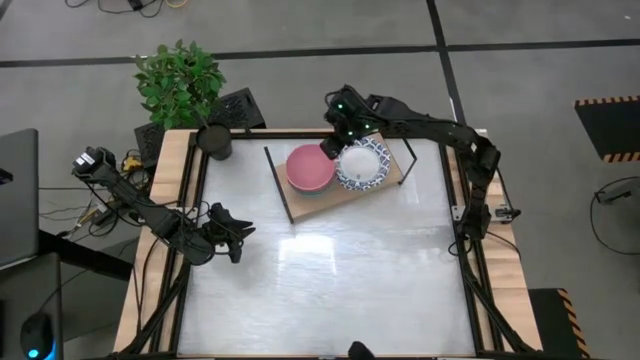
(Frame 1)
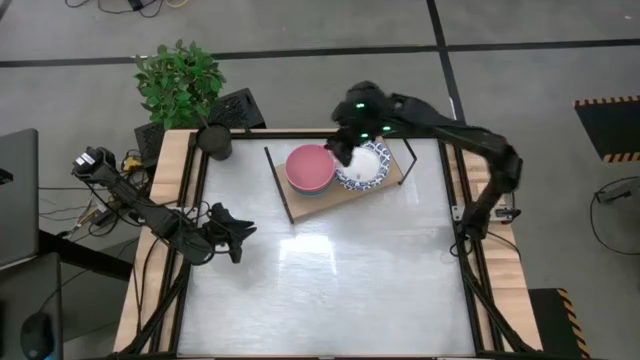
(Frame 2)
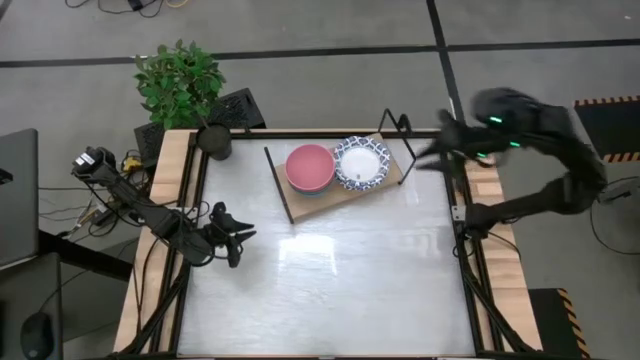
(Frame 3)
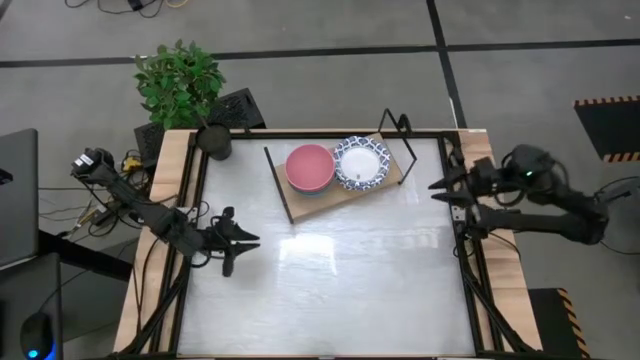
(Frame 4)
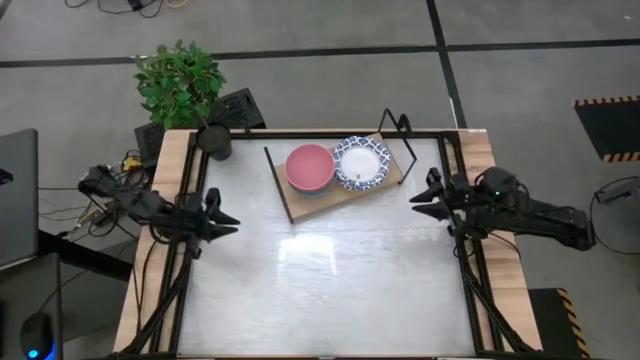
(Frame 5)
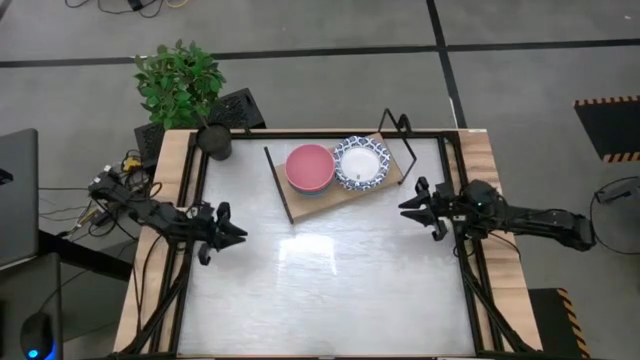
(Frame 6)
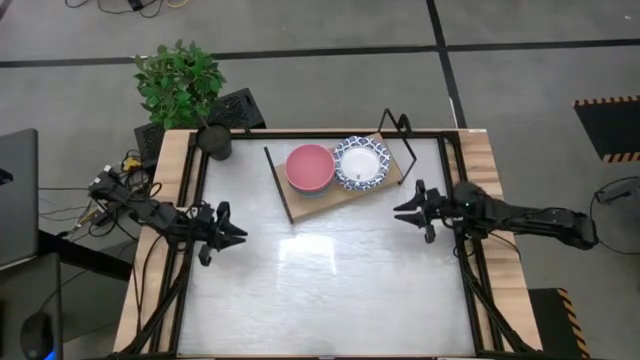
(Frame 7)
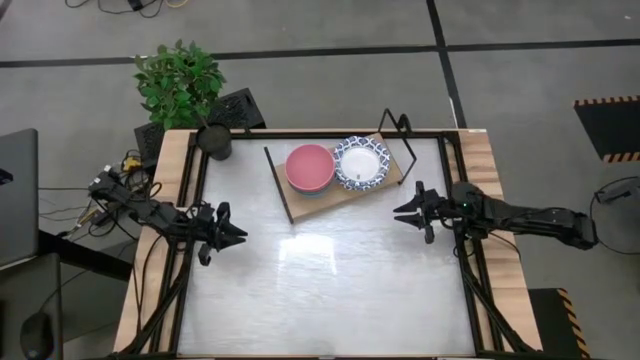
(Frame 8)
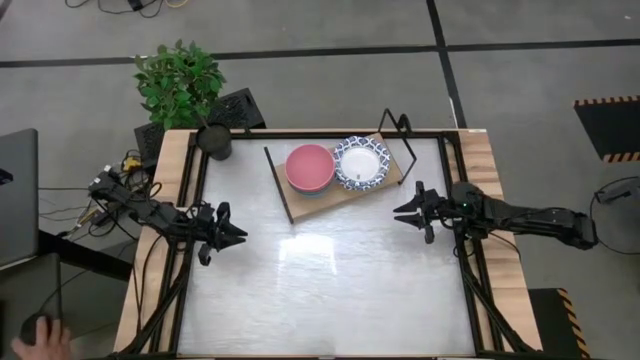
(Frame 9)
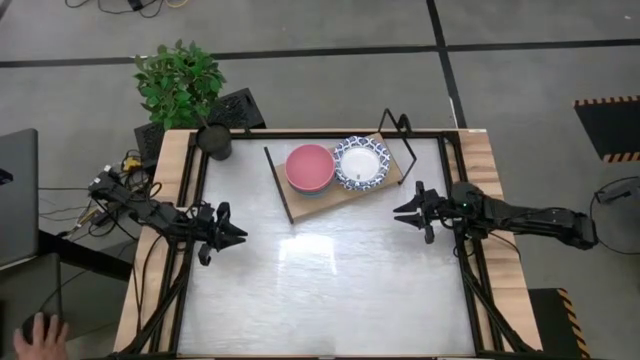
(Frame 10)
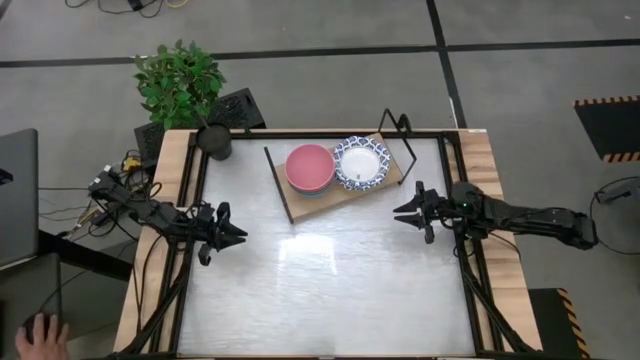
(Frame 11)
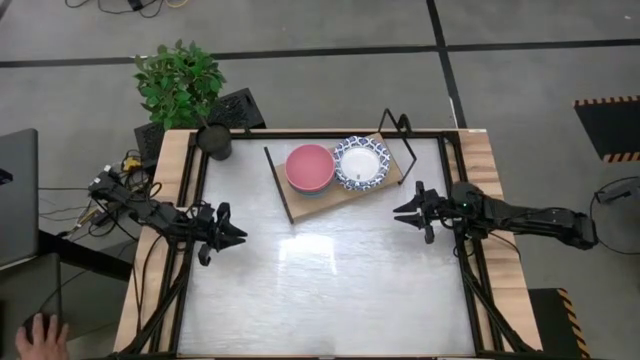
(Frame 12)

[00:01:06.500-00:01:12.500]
Task: Place and stack bowls onto a shelf
Return to Home Position

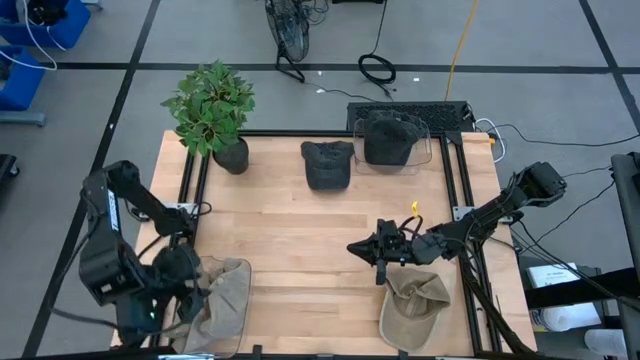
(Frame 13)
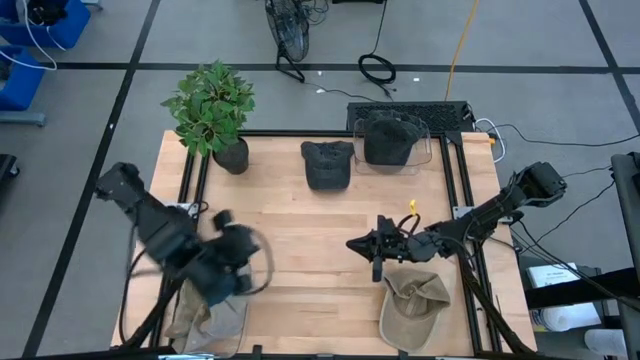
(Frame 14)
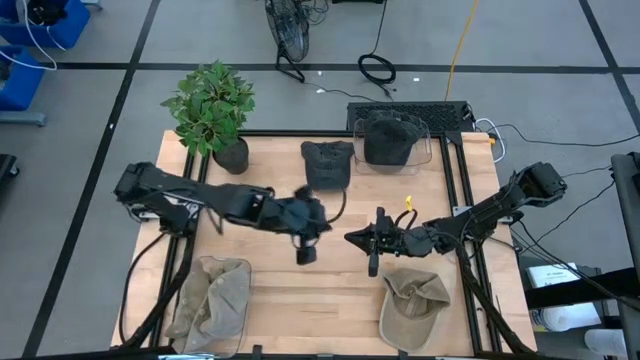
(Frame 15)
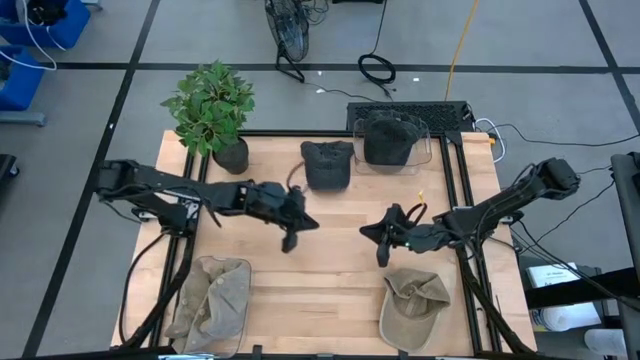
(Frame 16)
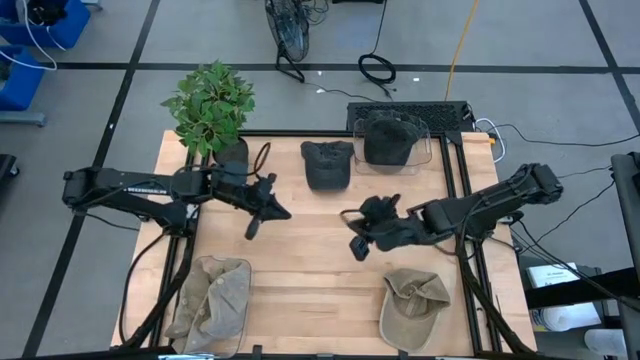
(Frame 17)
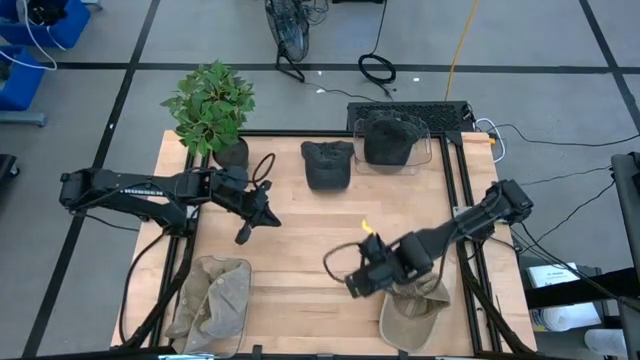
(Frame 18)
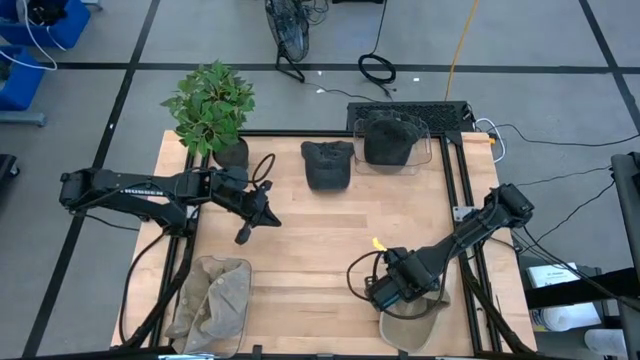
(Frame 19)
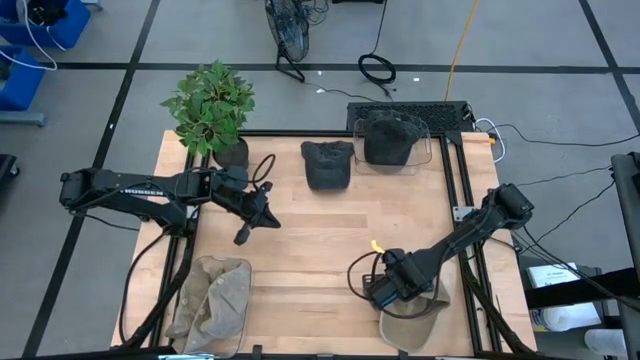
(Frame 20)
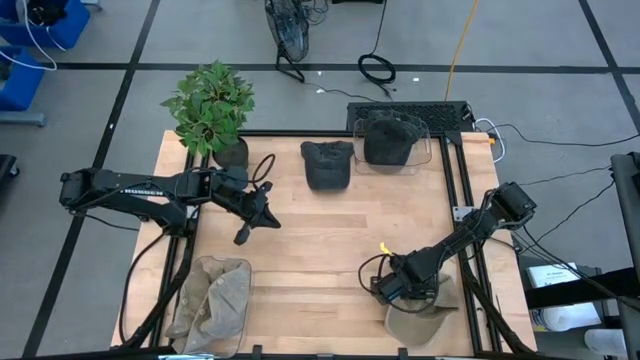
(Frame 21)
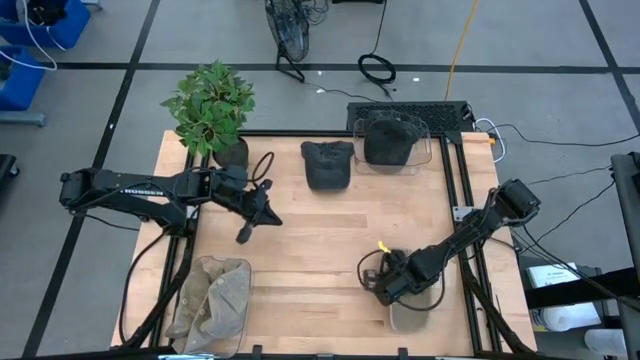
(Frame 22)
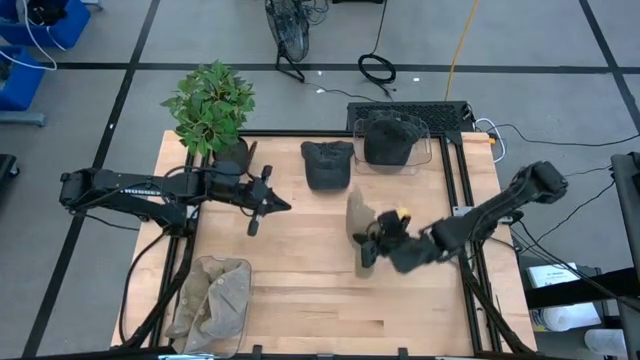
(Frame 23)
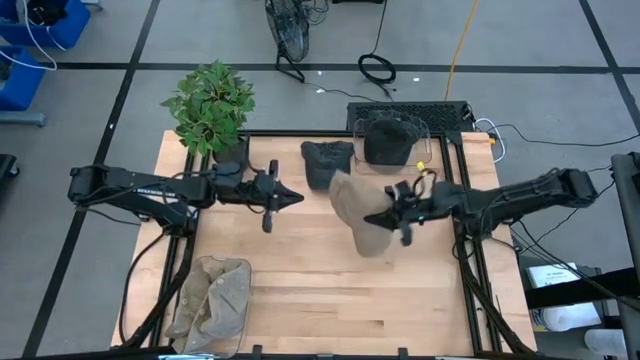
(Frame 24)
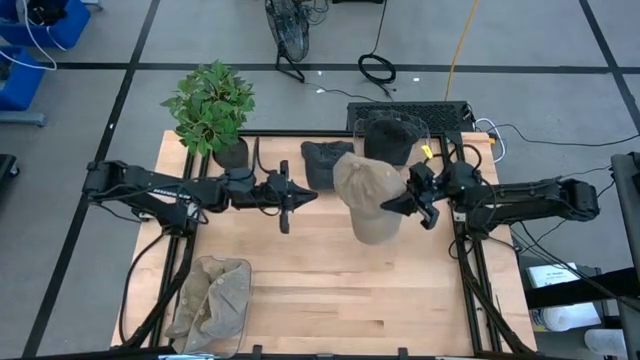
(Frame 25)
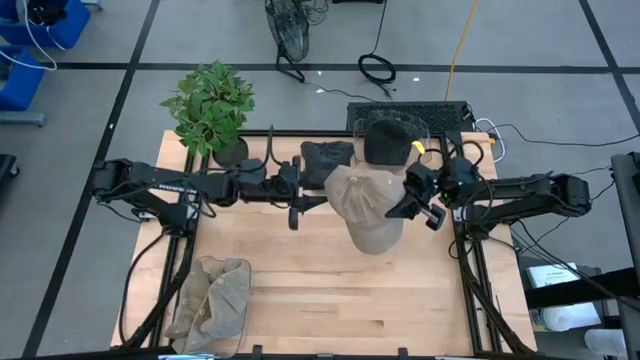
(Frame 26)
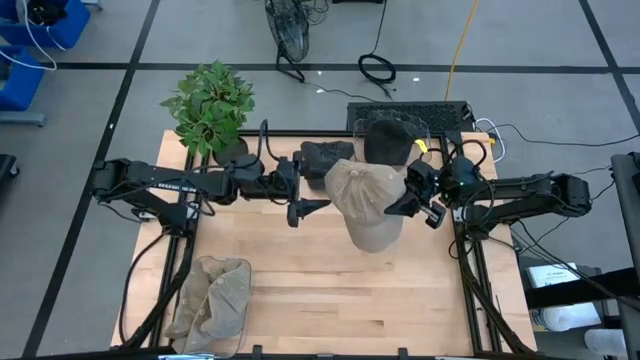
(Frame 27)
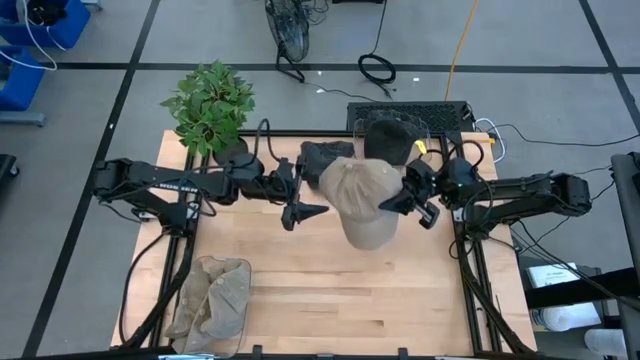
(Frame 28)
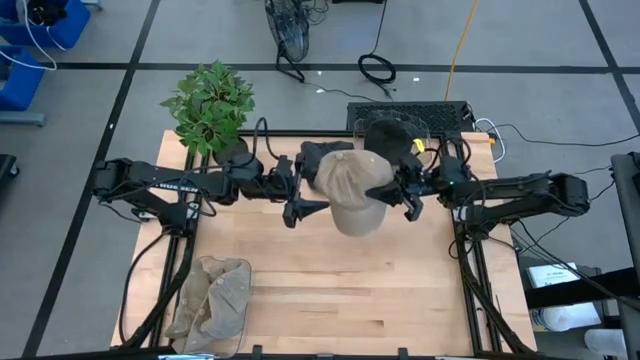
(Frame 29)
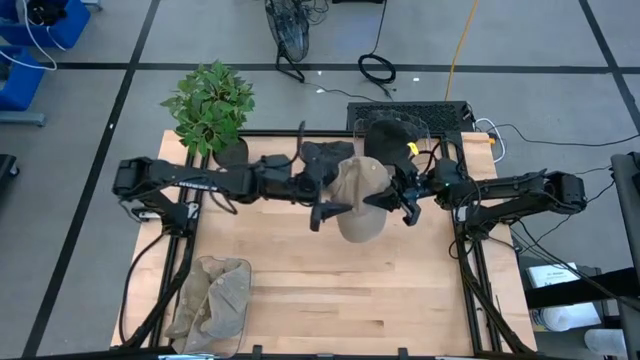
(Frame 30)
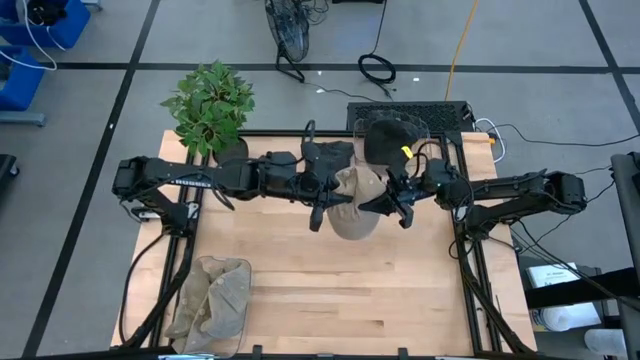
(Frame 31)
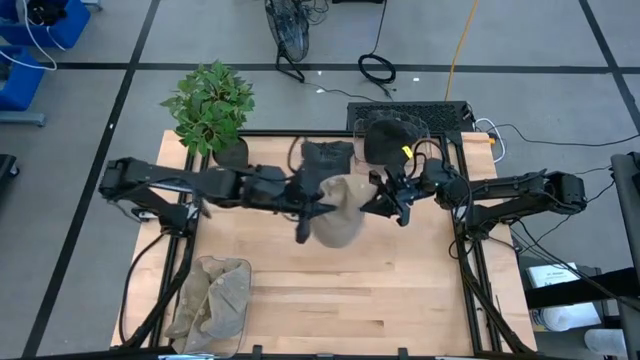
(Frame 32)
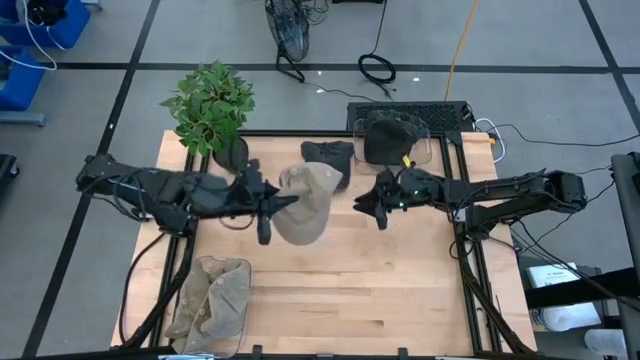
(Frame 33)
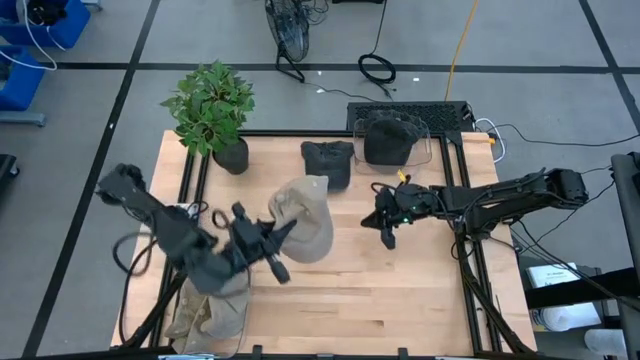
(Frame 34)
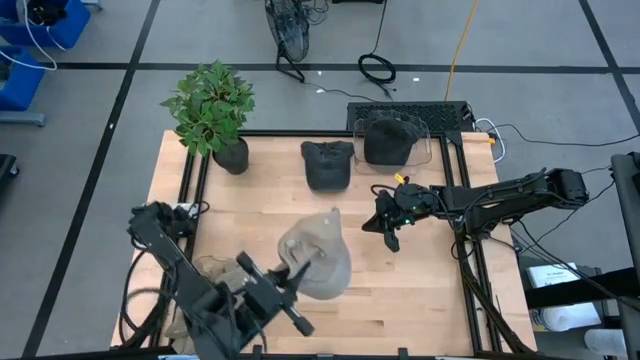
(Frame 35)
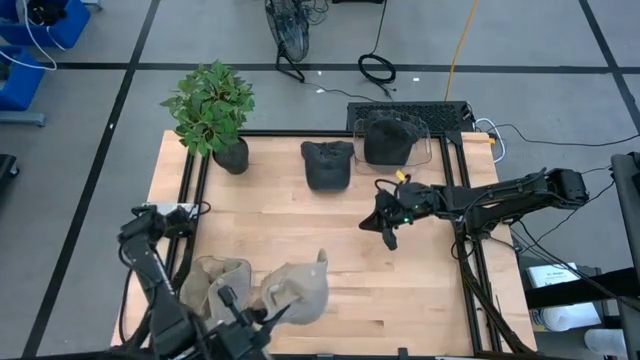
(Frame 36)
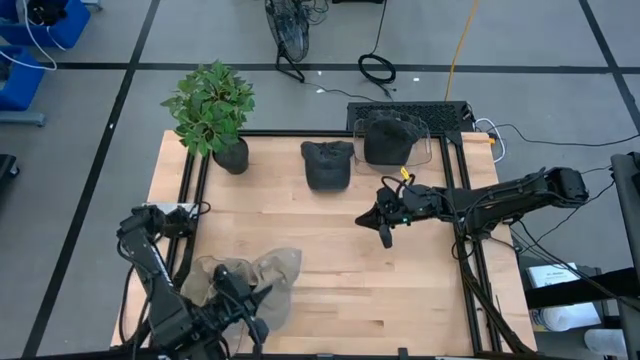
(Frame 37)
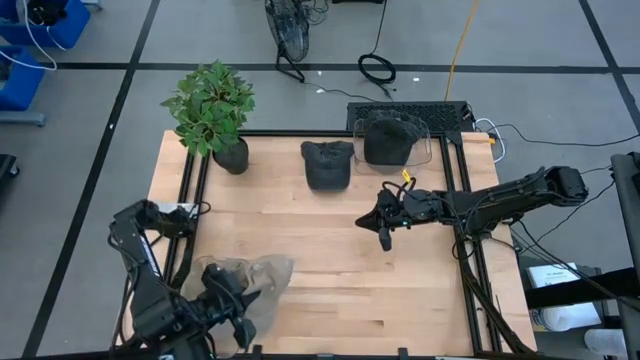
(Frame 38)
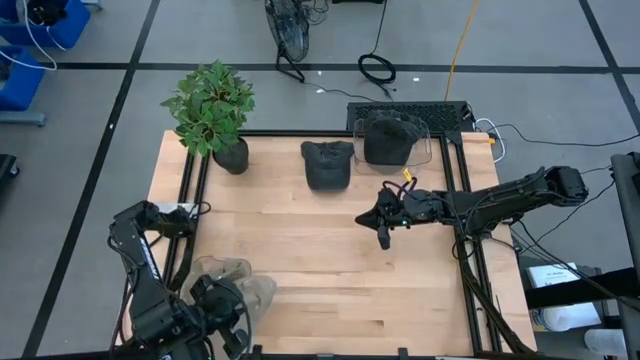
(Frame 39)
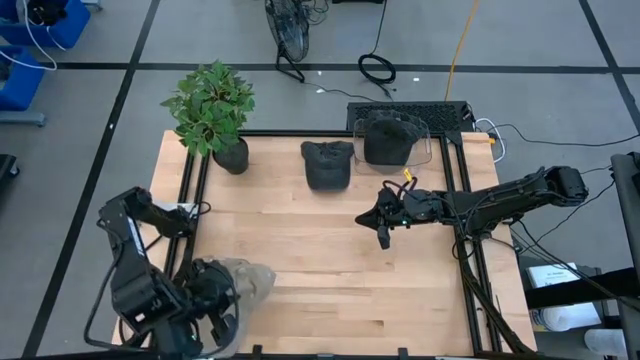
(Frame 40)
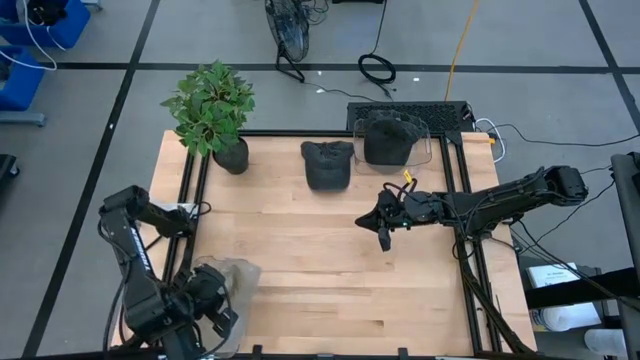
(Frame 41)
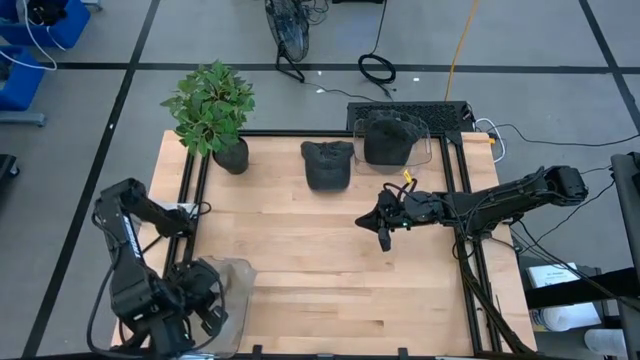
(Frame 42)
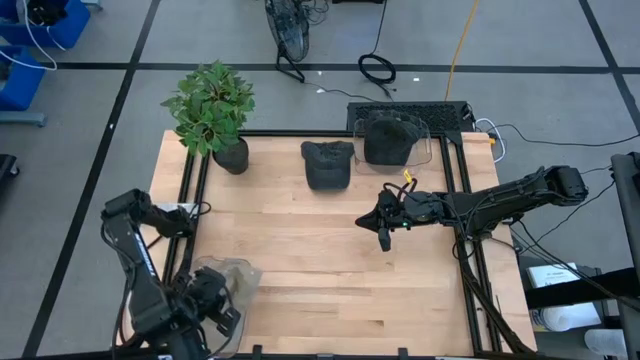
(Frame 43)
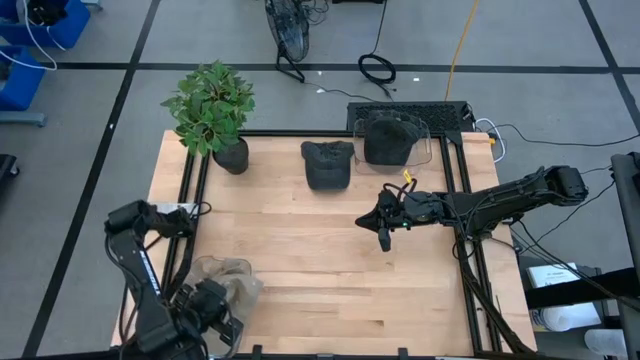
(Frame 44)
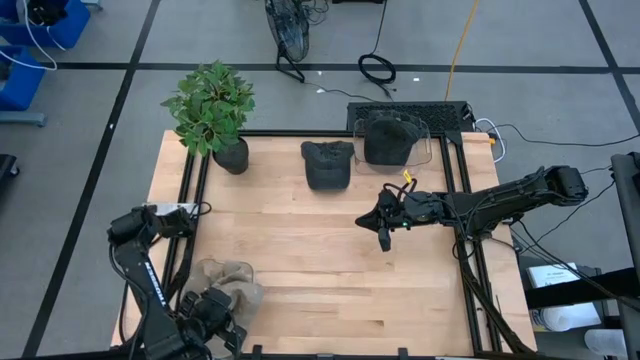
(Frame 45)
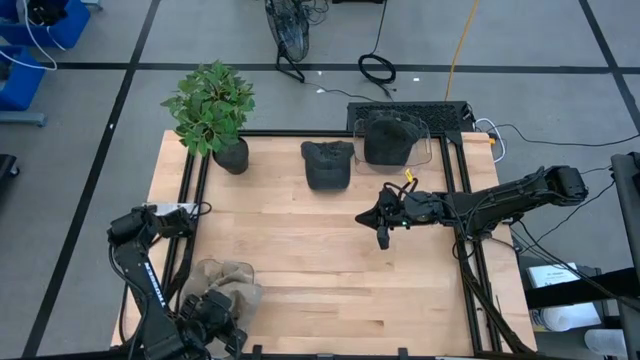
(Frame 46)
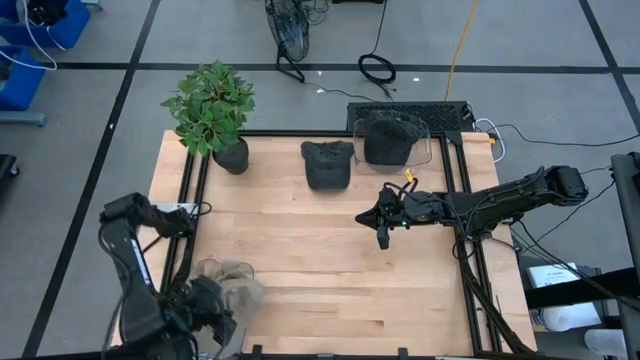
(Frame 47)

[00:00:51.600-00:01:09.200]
Task: Pick & Place hat
Put the brown cap into the bottom transparent bin
